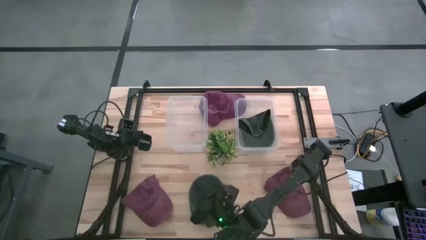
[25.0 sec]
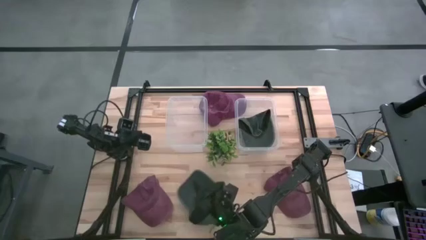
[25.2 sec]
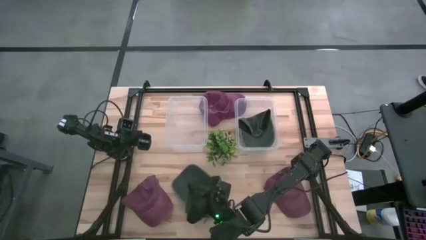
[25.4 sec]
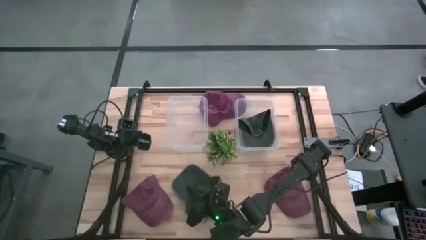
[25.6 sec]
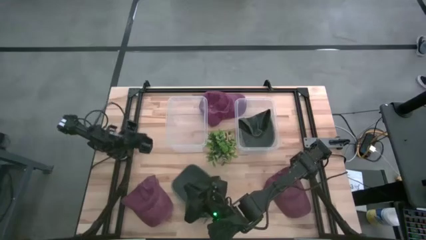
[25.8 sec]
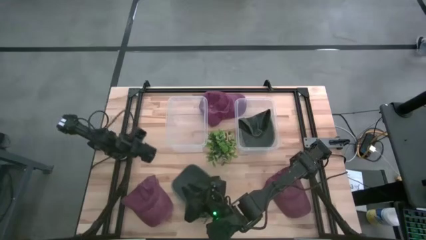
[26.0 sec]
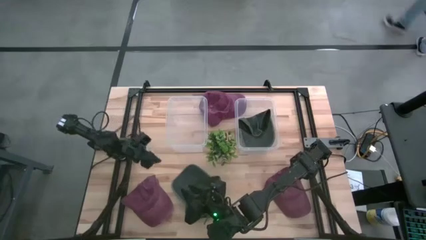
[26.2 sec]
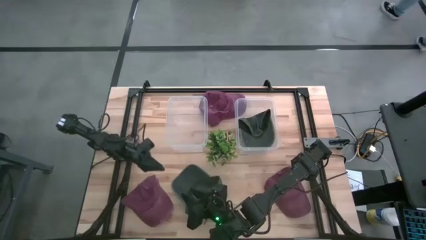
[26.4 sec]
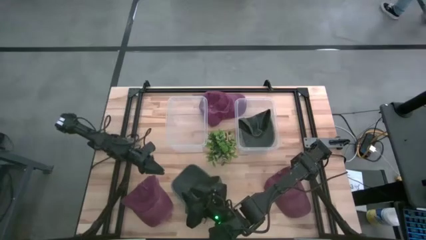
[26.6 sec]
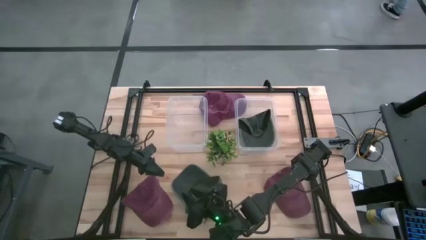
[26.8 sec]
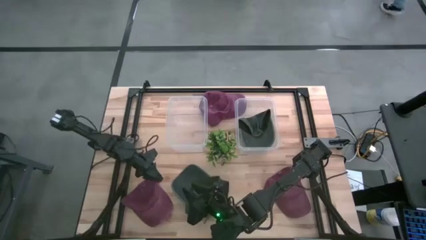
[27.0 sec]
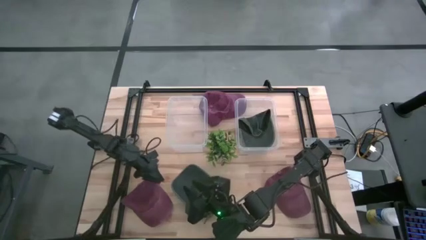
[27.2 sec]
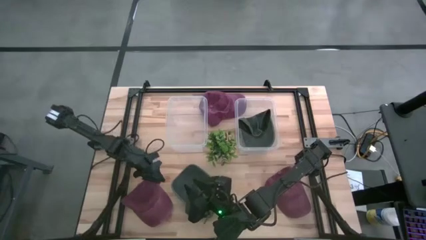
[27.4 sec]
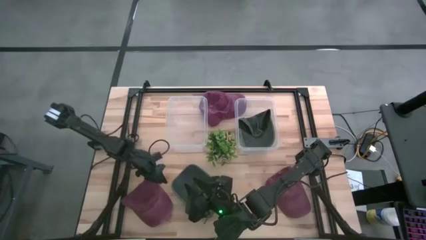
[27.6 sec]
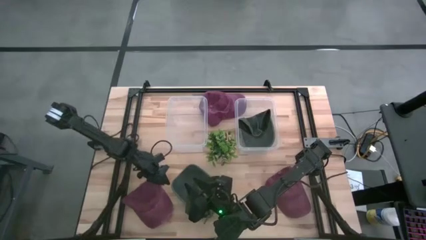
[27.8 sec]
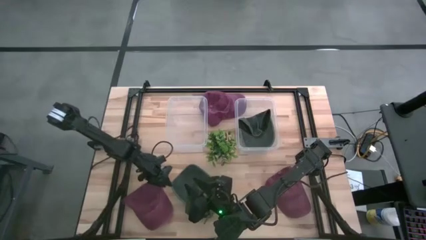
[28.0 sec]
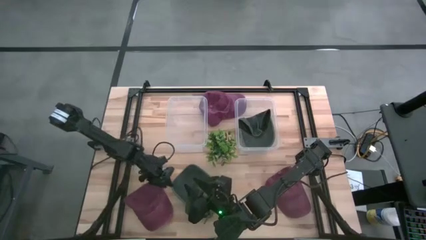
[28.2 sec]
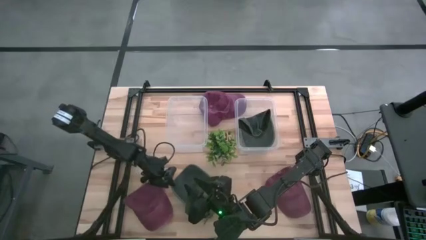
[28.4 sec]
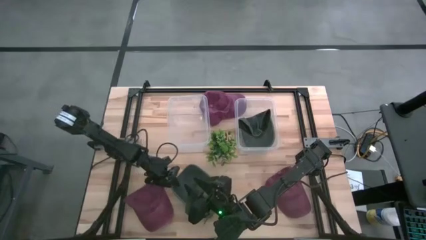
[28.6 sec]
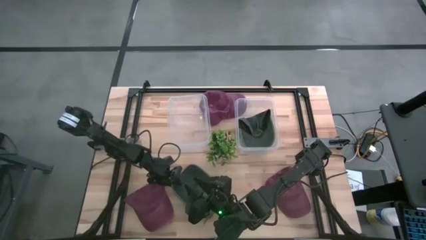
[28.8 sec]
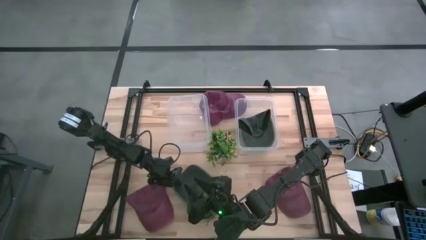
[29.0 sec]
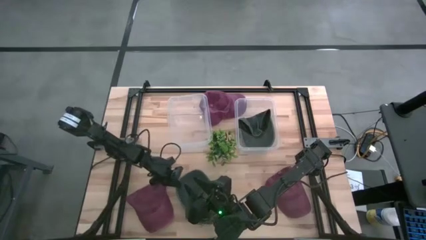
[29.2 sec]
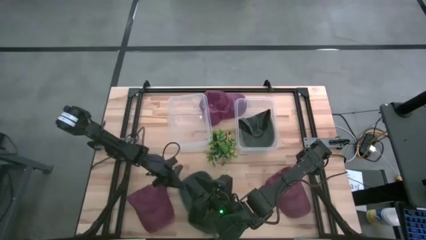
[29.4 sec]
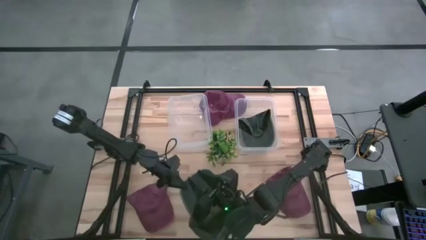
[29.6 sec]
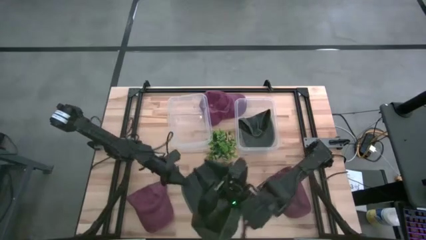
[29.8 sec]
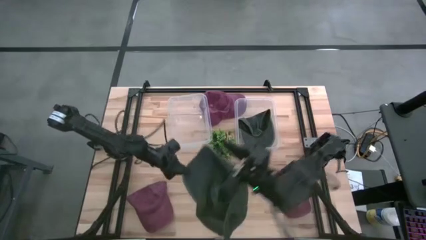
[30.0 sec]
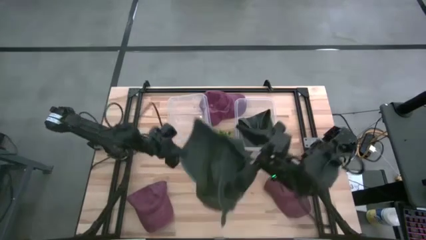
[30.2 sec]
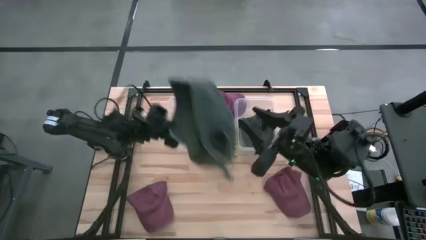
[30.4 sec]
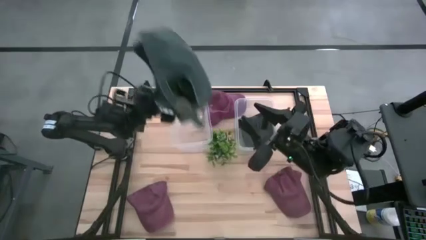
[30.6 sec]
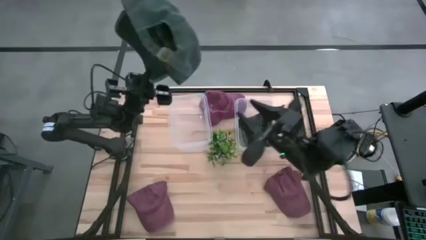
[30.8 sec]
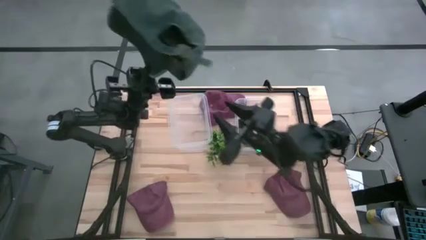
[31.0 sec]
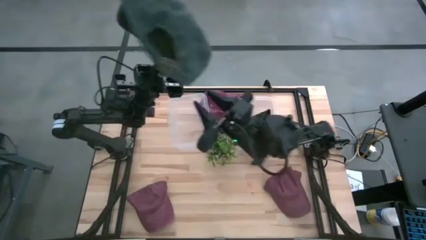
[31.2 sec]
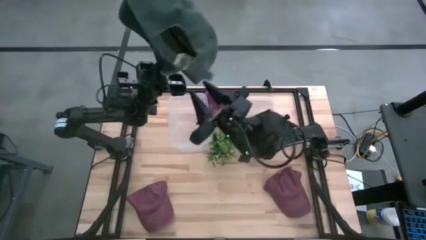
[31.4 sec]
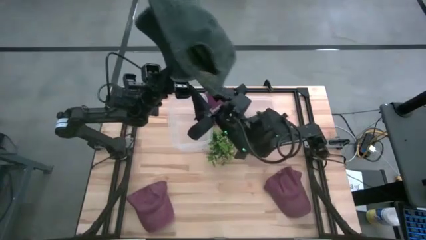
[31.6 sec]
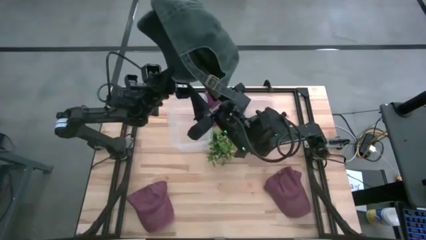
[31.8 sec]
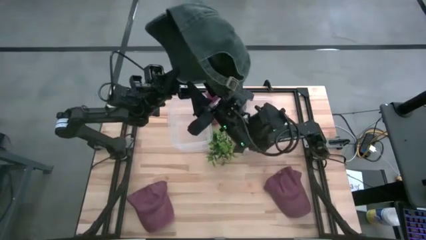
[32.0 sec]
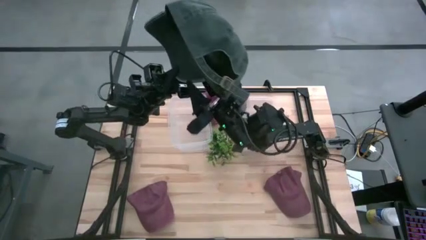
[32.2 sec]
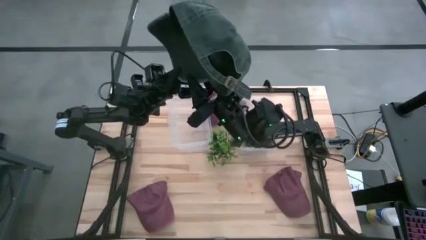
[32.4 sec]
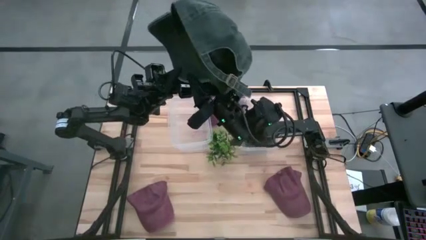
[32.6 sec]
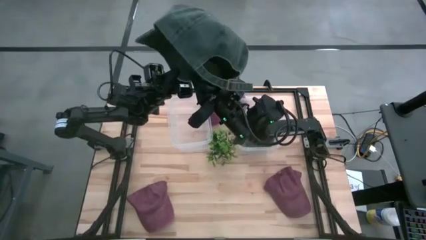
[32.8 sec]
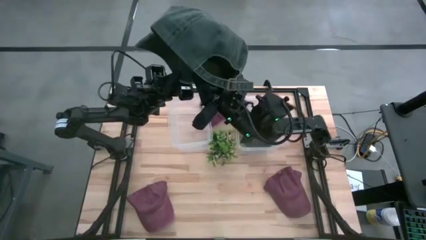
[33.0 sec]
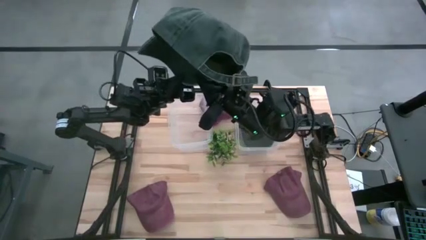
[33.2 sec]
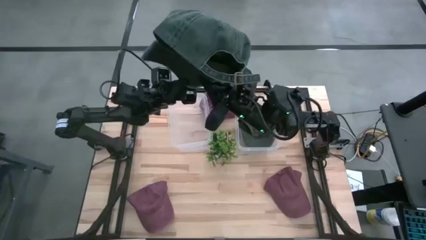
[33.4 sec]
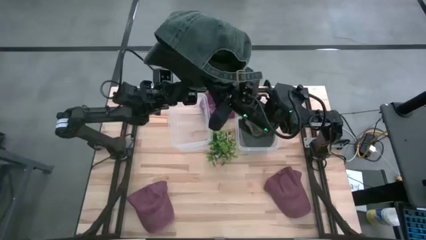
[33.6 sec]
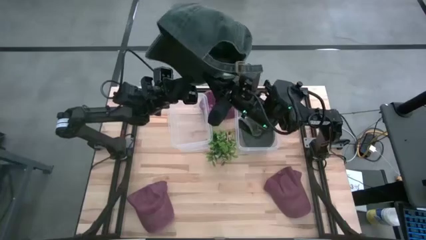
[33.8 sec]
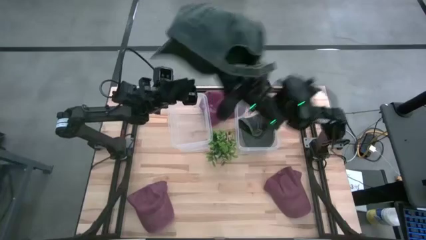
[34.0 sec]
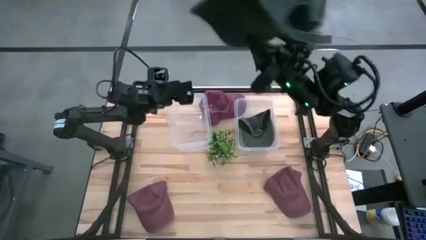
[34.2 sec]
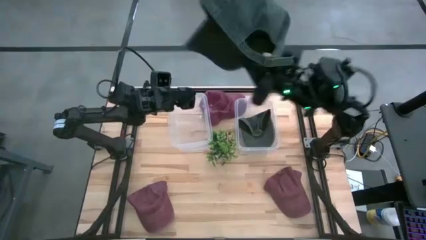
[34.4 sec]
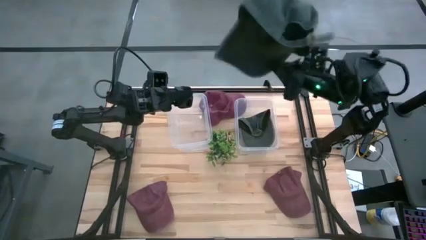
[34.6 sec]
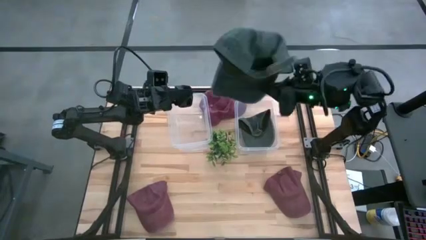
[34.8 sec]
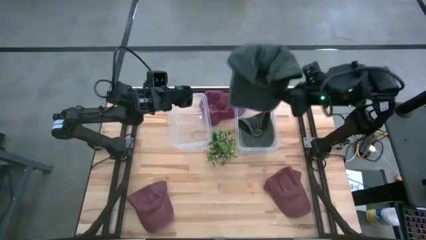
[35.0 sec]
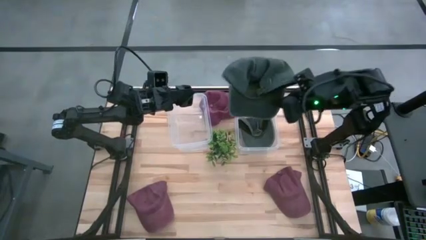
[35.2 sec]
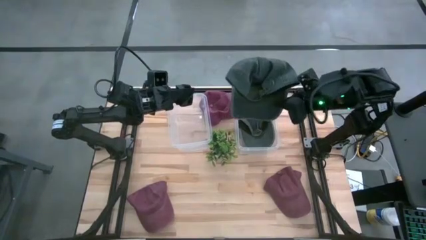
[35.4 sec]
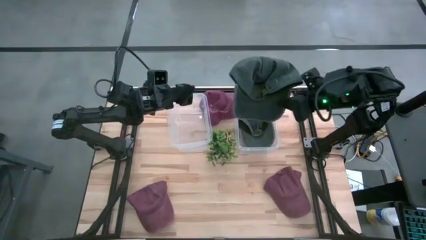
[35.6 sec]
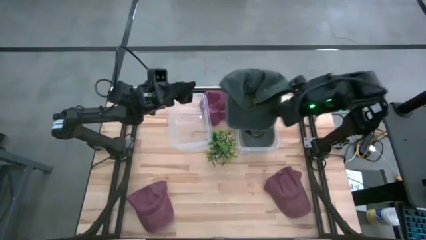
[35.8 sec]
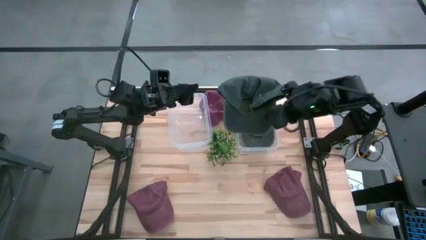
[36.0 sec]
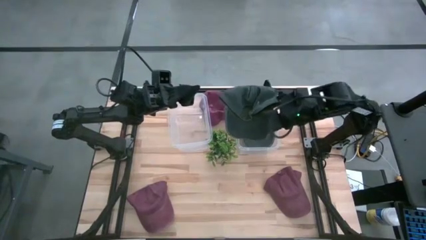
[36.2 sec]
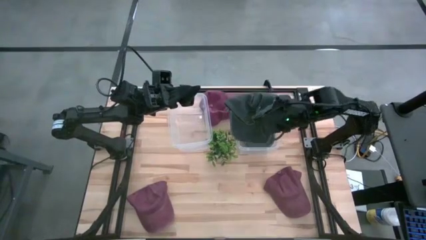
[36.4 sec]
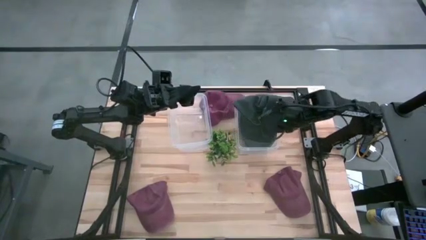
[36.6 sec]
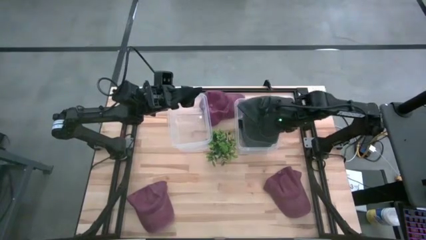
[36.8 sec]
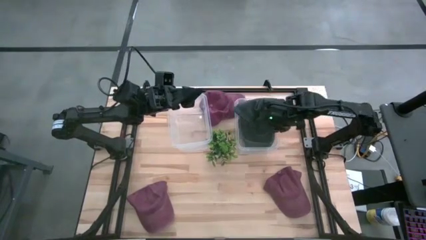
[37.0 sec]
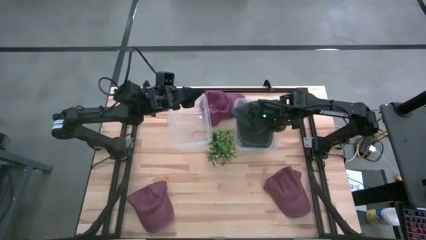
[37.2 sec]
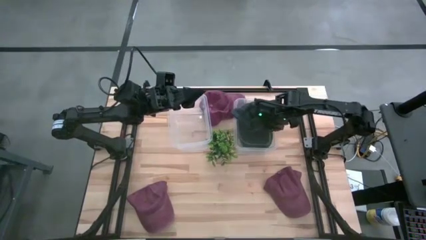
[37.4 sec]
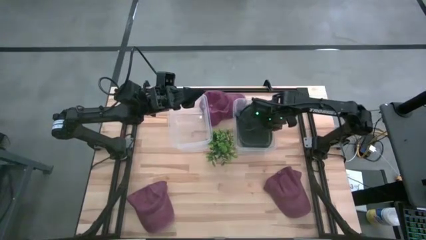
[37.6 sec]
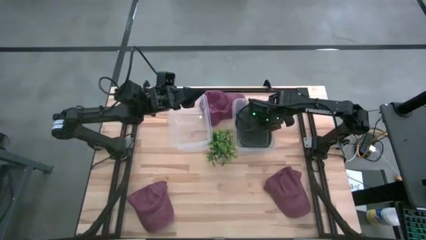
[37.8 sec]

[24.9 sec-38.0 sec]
Task: Pick & Place hat
Put the black cap into the right transparent bin

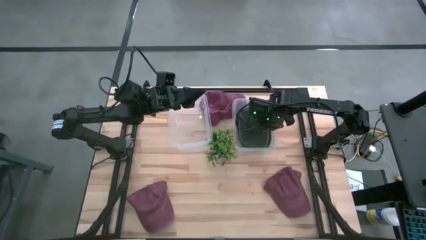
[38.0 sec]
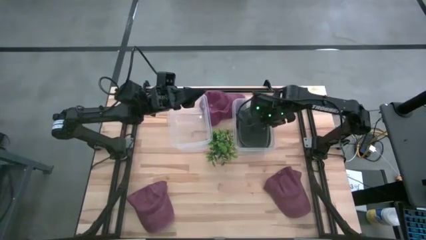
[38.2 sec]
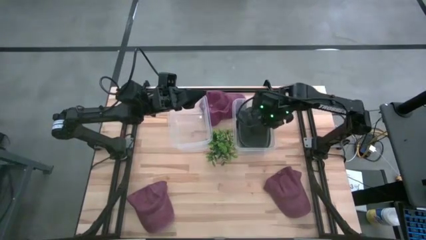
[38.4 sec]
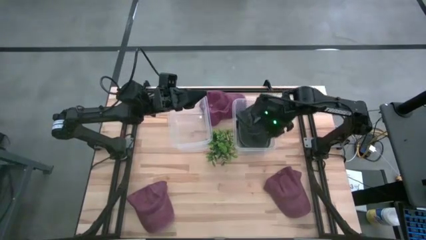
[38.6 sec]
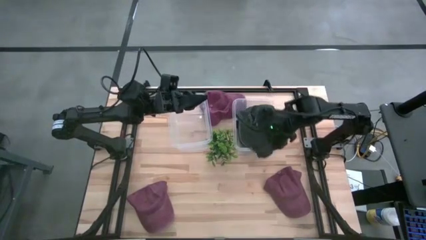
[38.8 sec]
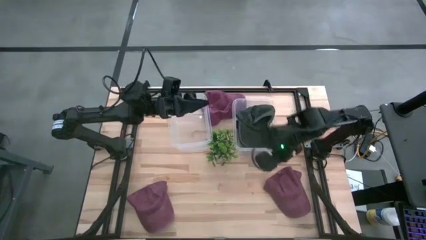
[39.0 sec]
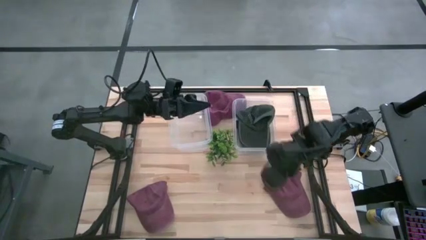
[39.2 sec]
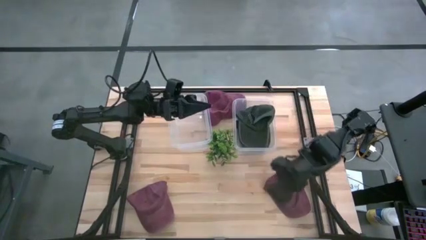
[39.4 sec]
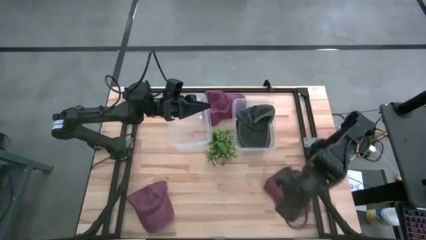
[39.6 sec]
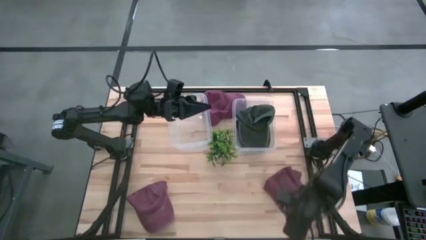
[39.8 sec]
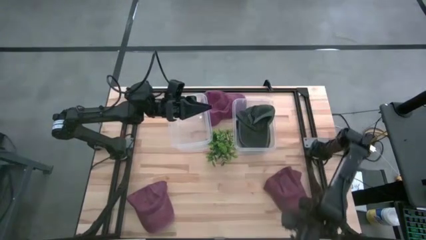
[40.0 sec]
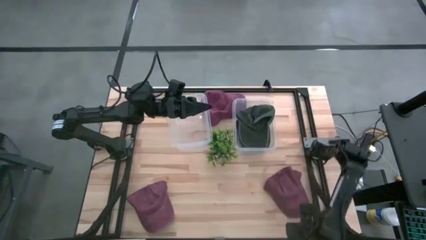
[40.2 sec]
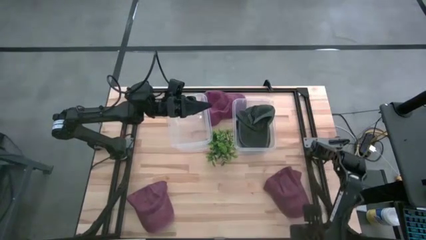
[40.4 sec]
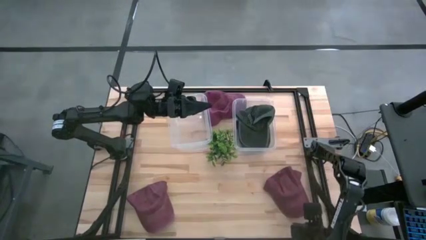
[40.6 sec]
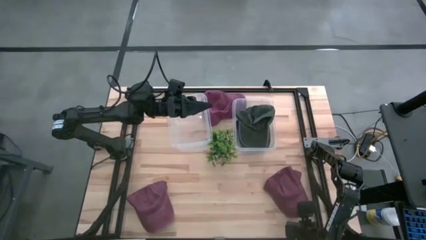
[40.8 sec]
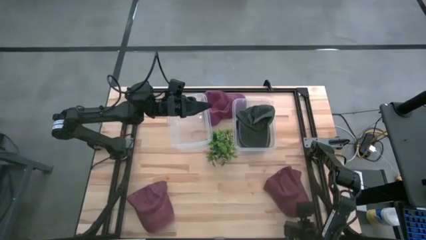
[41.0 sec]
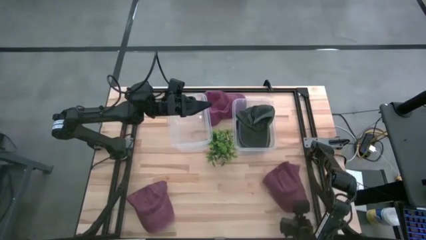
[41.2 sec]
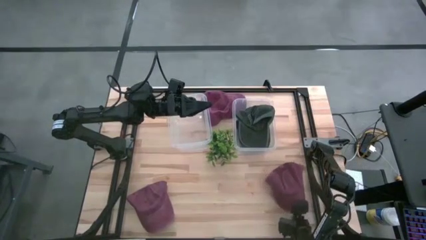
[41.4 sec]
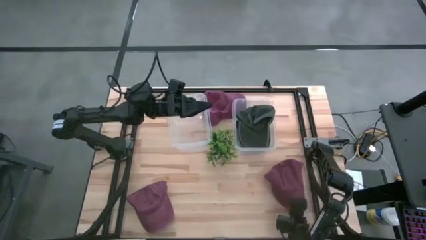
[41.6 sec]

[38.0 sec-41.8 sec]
Put the right red cap into the left transparent bin
